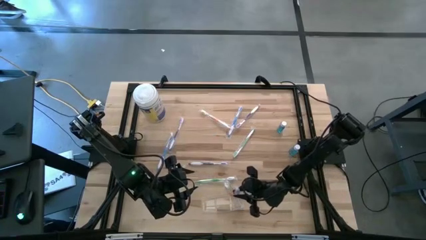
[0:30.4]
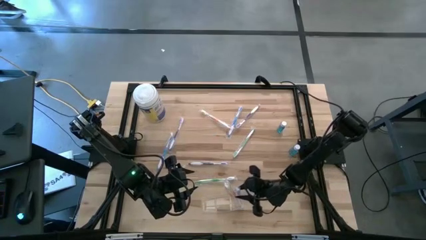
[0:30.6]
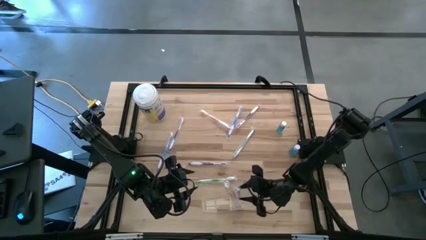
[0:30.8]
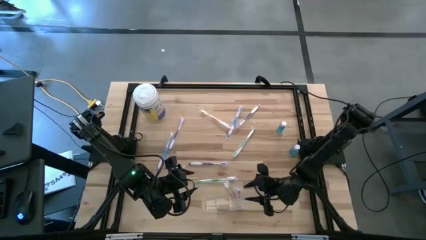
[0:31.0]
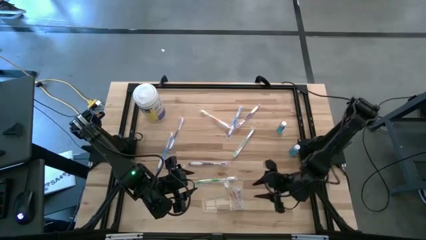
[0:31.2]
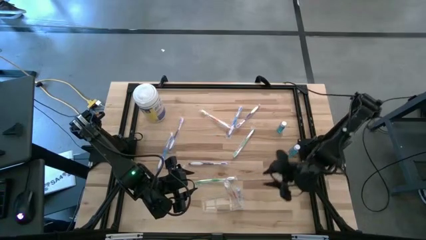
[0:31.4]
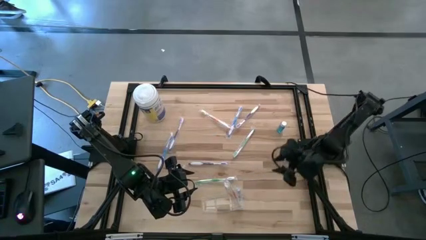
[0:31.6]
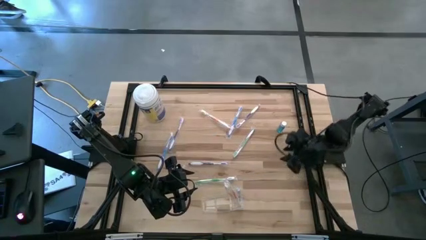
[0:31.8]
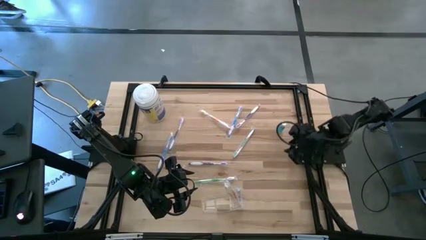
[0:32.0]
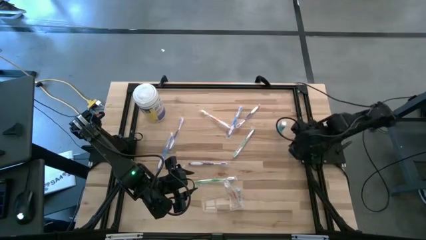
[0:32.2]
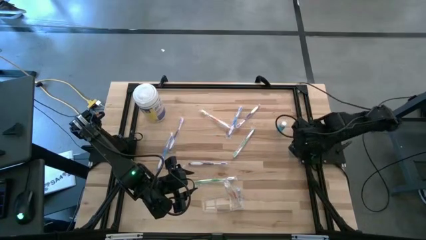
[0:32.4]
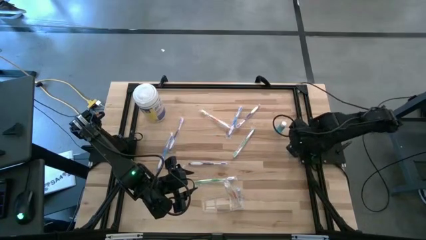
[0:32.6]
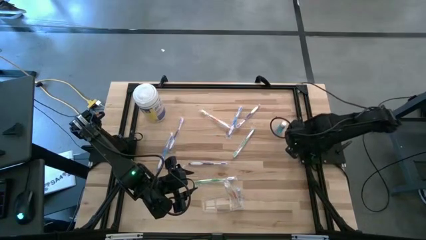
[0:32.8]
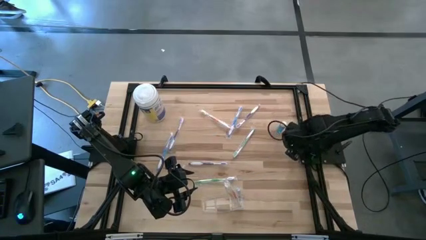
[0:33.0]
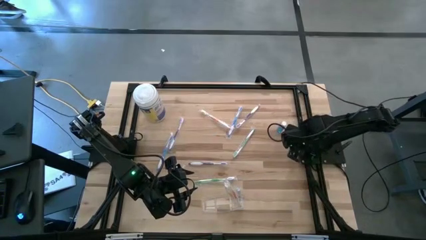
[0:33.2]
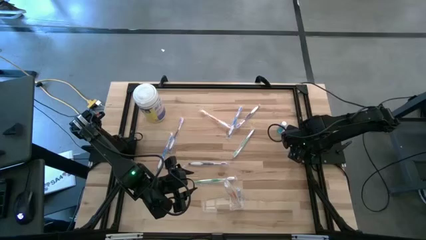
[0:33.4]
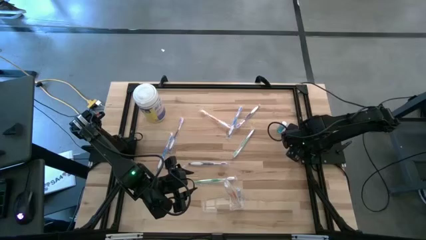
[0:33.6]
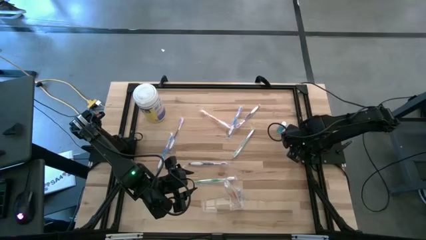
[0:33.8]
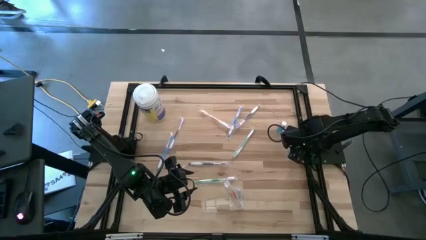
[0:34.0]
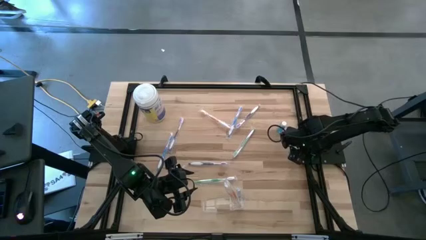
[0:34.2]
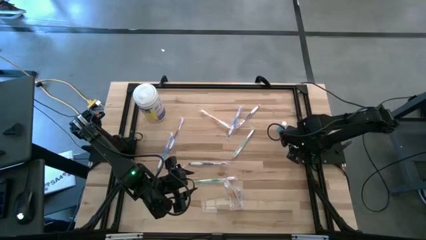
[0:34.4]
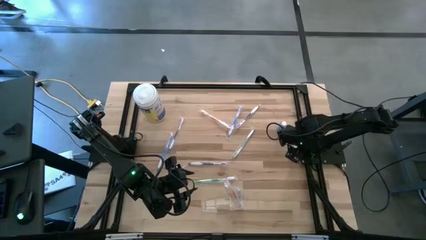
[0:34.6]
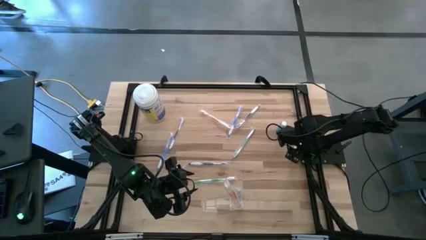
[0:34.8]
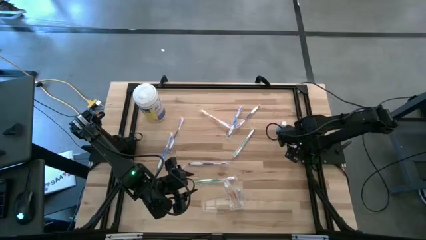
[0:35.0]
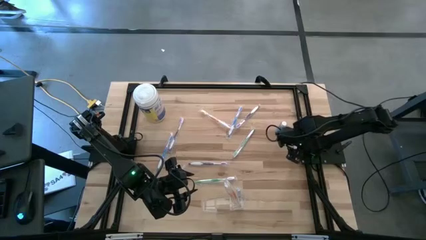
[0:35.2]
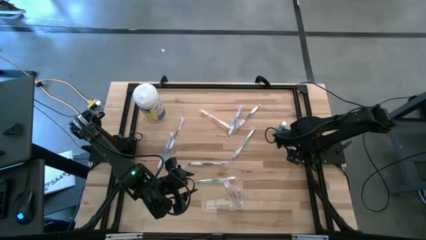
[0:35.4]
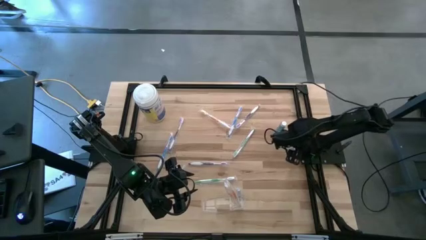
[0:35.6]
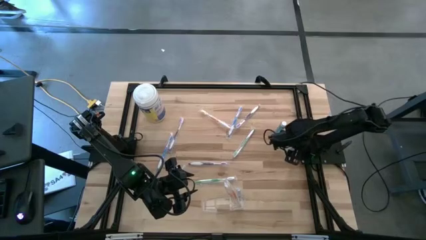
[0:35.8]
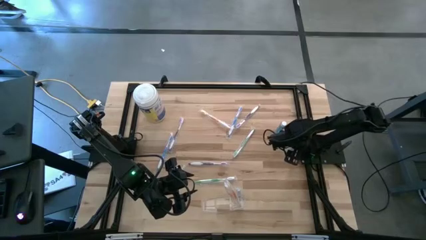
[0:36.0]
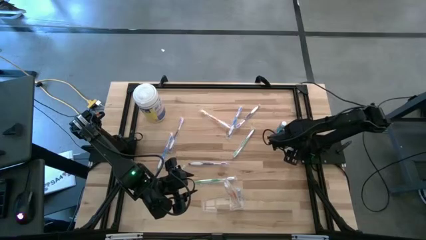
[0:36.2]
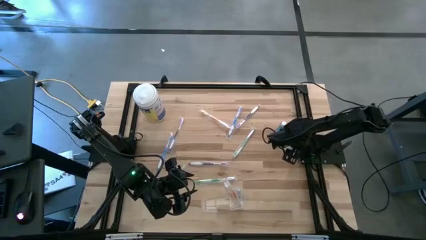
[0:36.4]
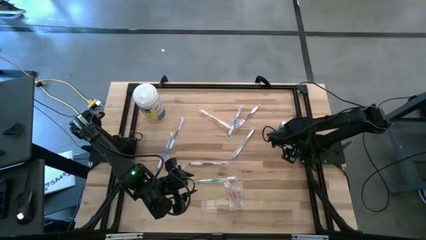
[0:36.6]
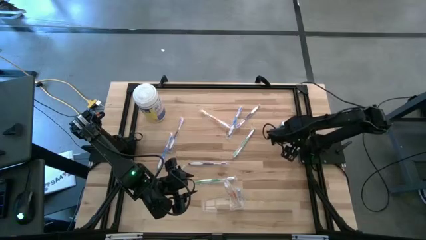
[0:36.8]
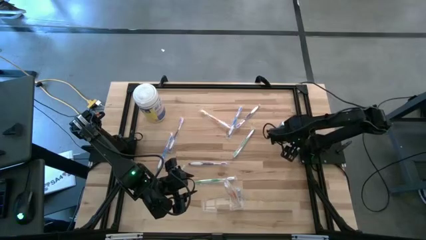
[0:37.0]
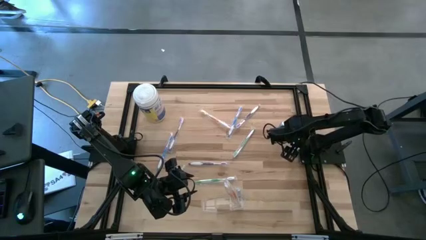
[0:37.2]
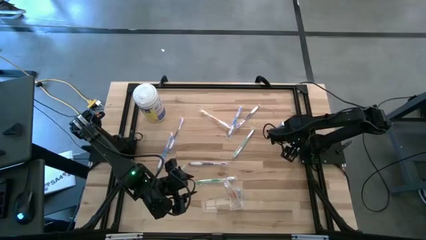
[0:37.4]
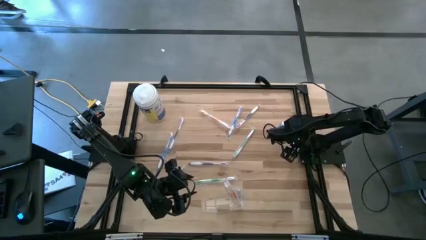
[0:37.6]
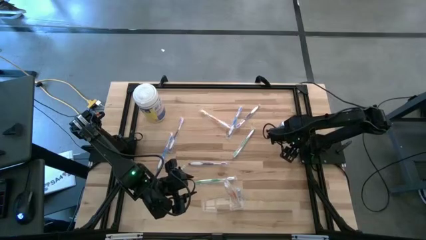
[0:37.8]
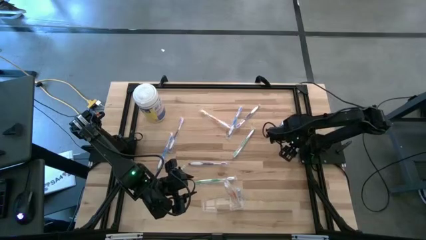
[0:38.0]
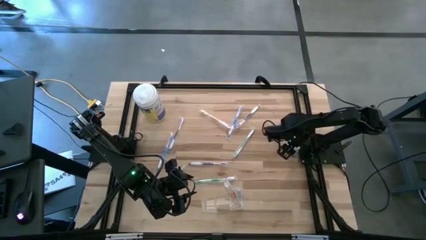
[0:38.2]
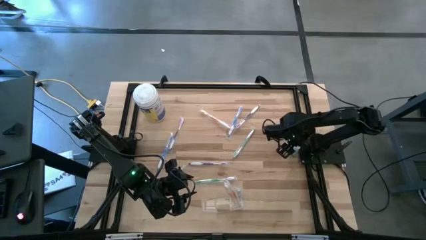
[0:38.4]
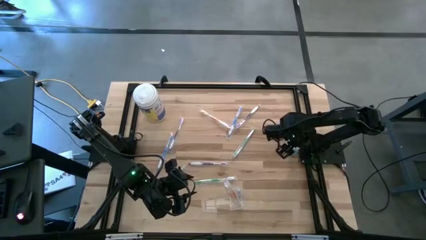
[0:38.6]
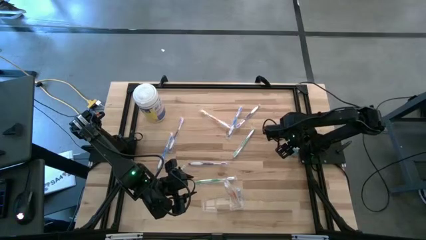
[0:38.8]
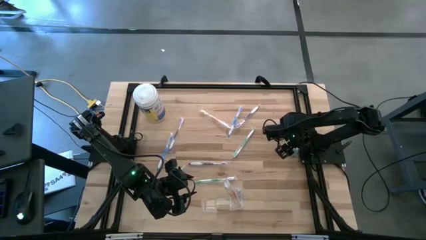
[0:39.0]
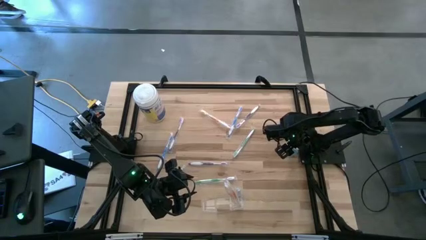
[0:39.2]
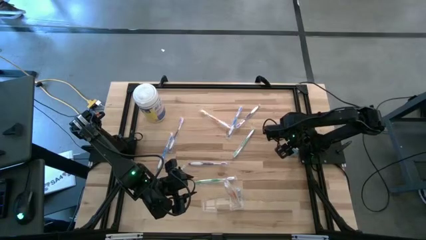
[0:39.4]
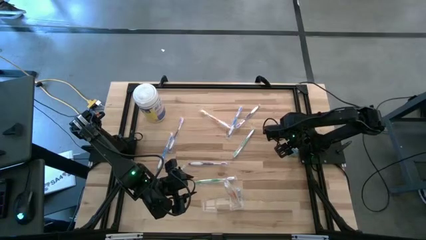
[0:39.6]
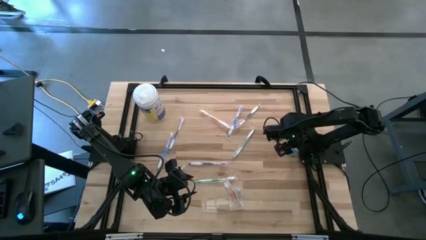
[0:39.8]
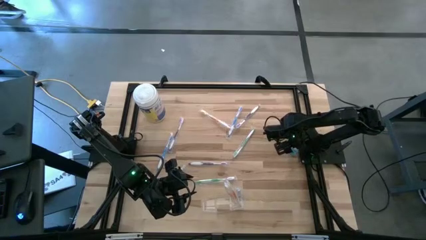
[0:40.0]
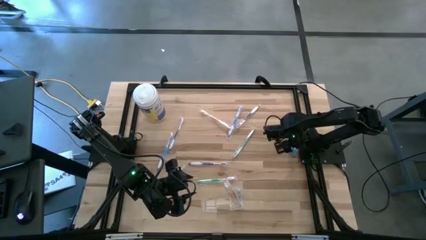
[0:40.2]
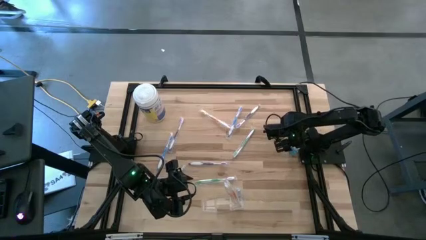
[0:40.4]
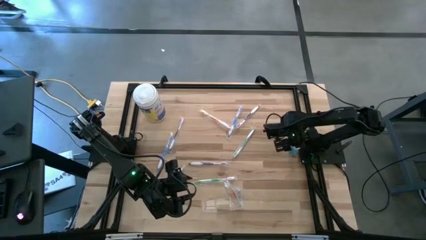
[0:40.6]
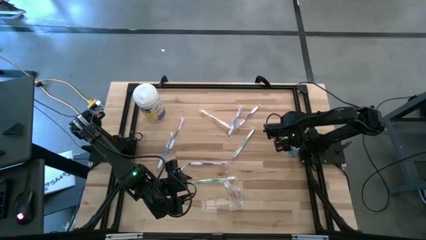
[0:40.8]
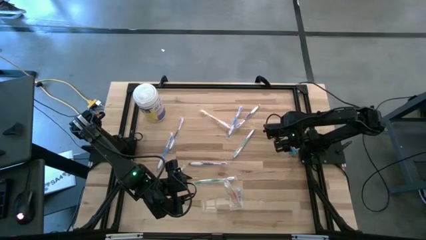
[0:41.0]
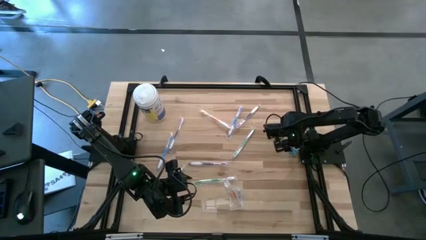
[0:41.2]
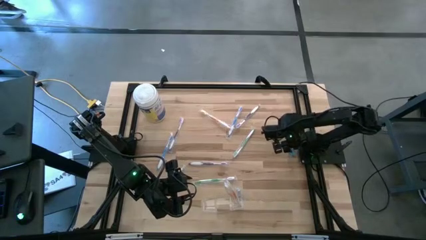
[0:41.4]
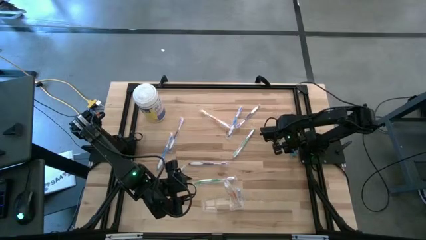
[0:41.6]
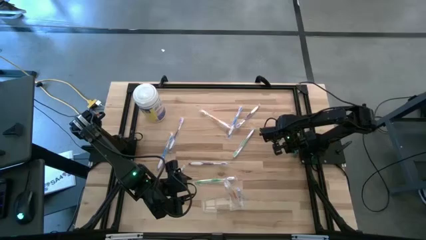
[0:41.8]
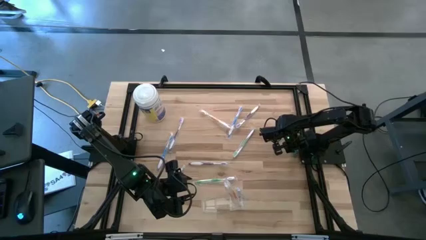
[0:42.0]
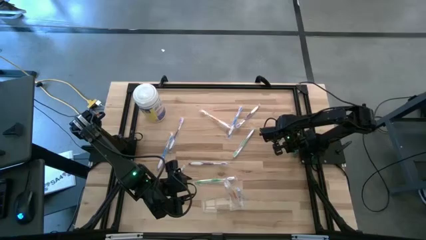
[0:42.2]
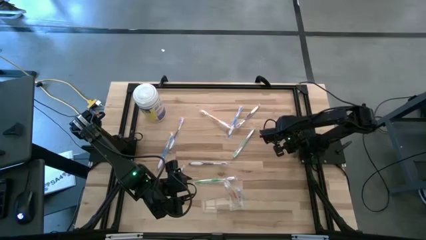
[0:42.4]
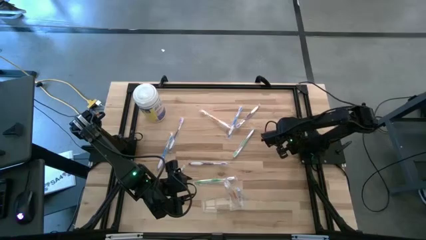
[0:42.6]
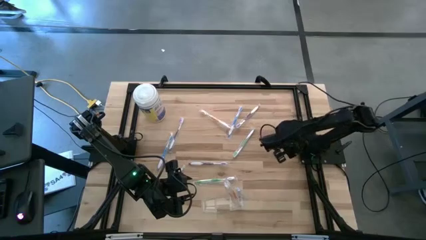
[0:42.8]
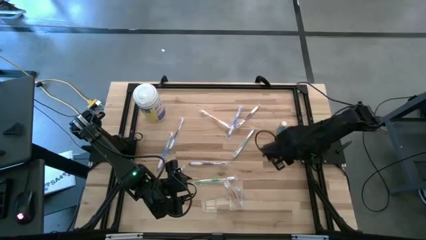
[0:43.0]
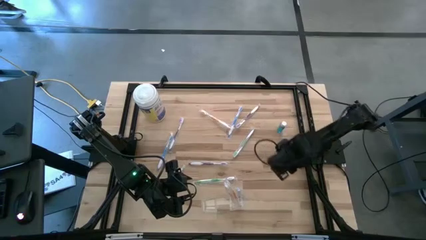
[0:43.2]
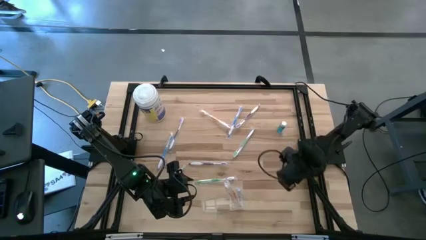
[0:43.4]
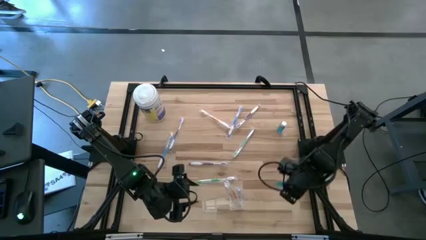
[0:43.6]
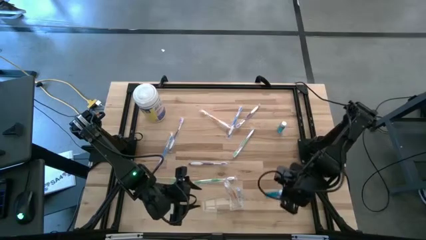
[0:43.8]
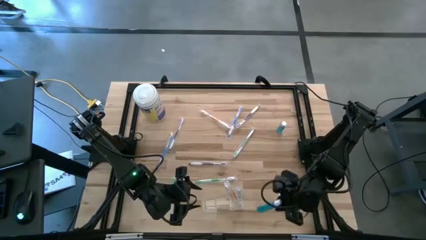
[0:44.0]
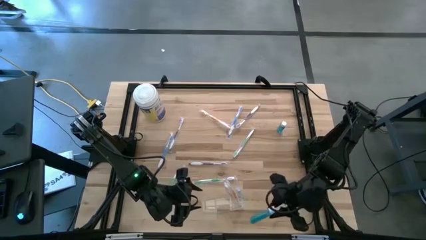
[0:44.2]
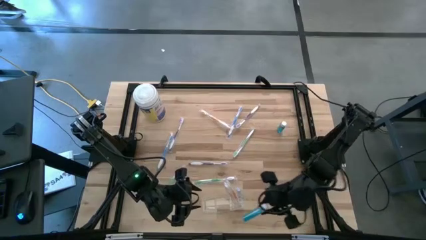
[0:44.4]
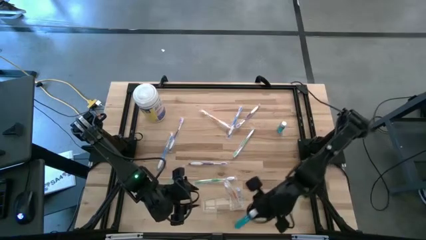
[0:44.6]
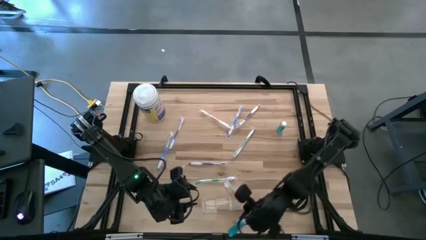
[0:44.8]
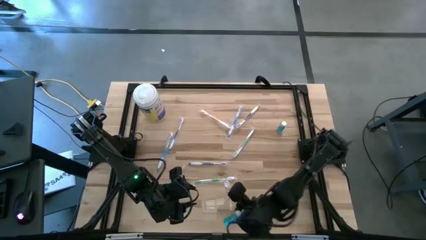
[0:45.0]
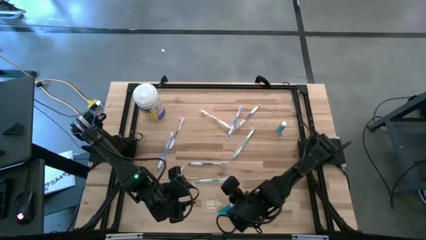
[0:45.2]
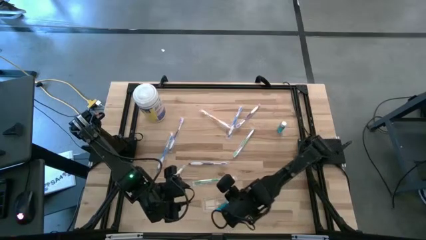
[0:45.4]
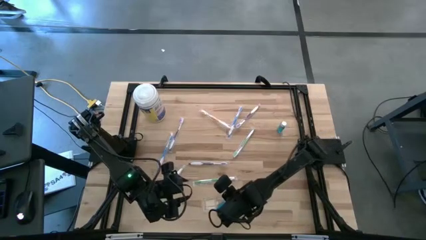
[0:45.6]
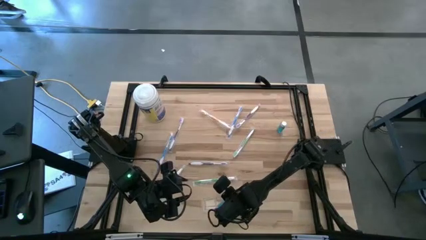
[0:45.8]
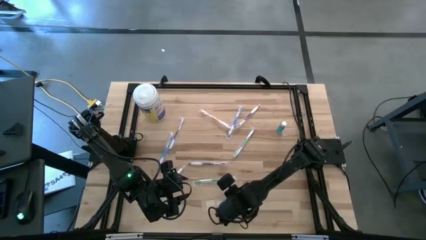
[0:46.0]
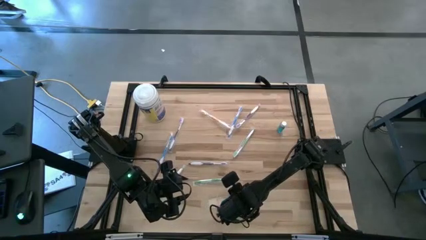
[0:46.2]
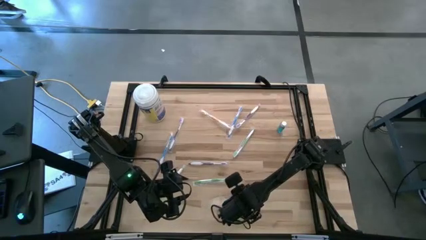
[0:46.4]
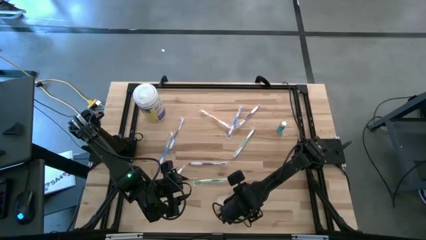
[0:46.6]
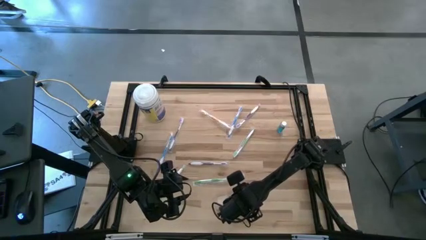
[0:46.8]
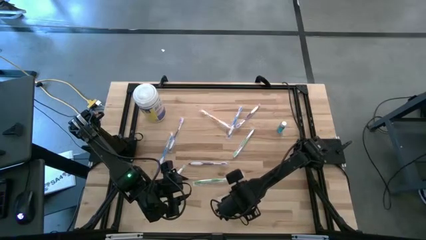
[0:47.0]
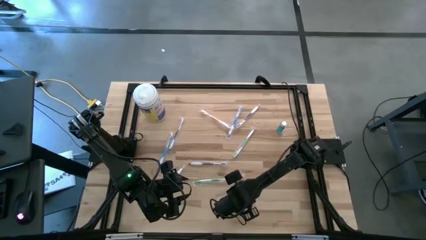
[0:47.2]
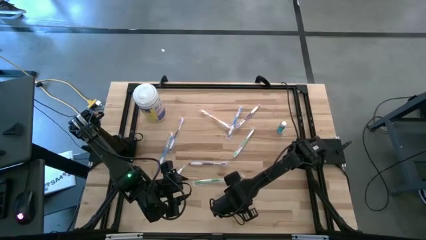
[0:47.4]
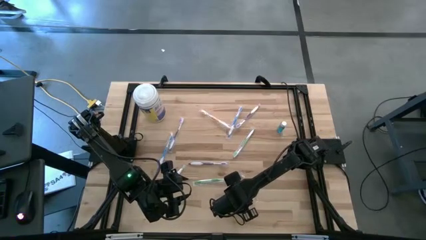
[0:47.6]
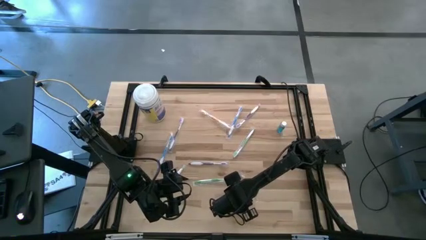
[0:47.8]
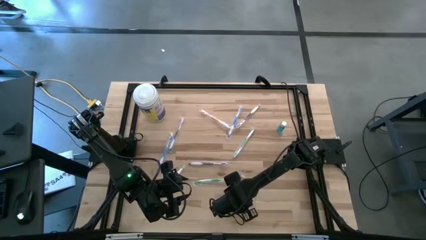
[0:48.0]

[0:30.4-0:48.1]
Task: Pick & Place toothbrushing station
Put the bottom right mouthwash into the transparent bin
